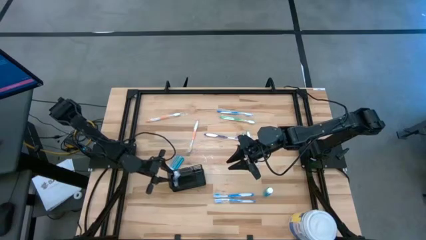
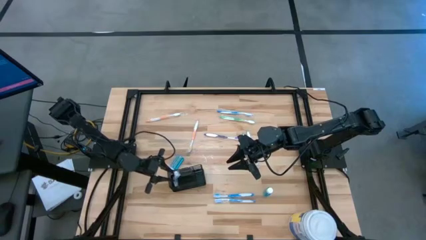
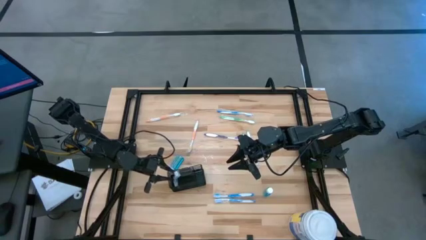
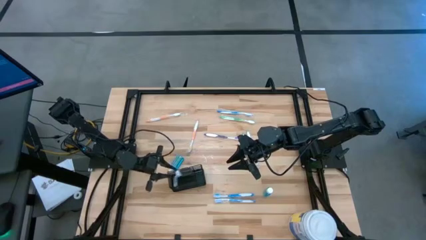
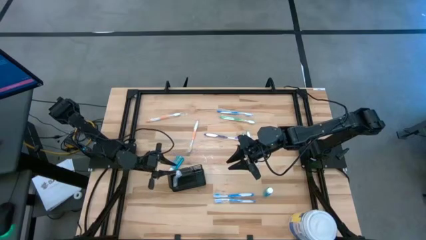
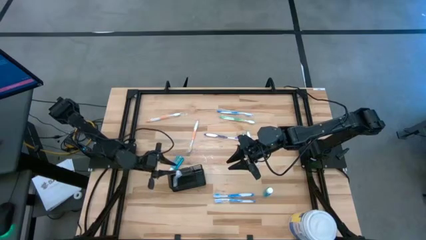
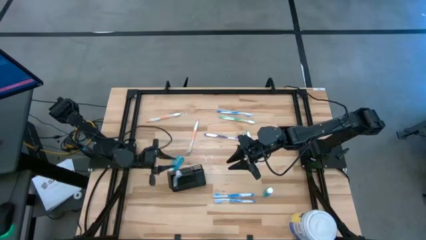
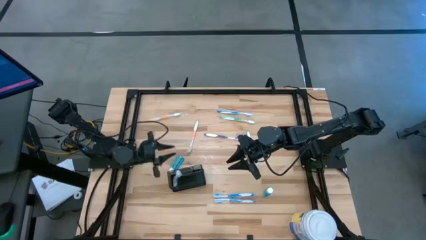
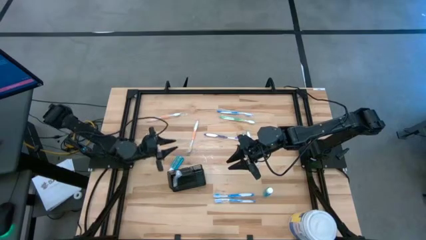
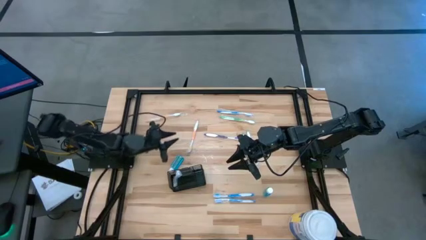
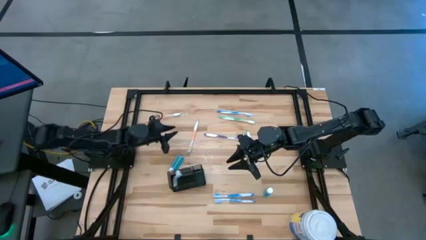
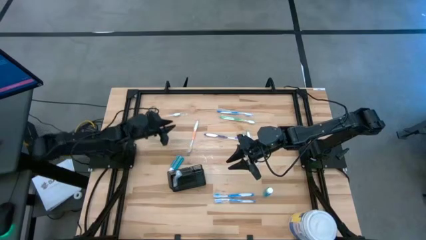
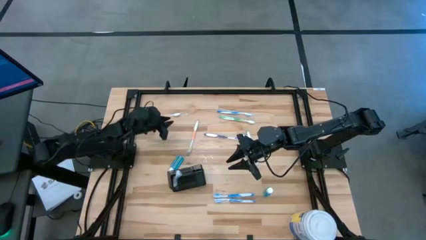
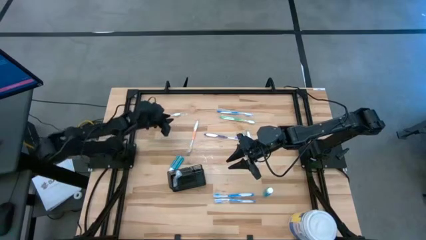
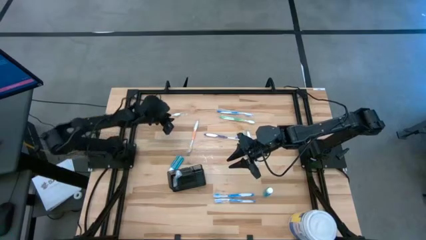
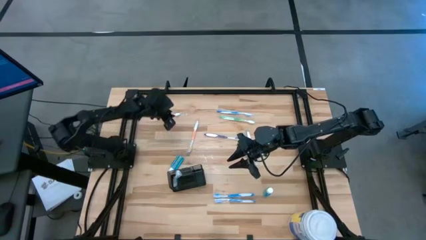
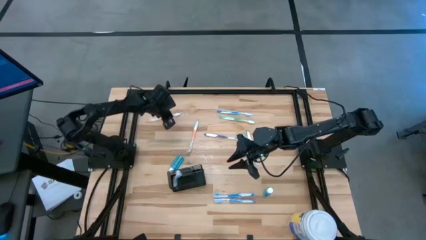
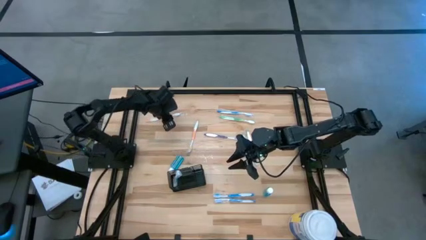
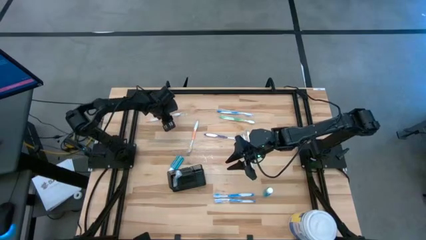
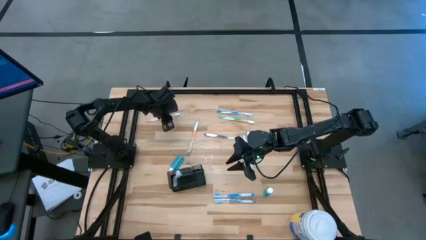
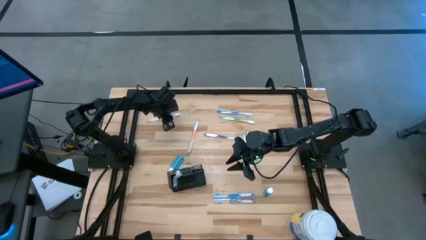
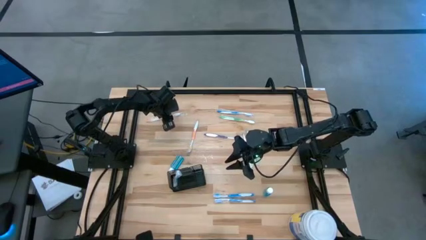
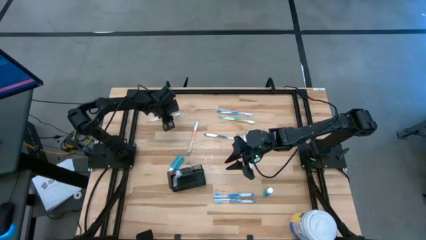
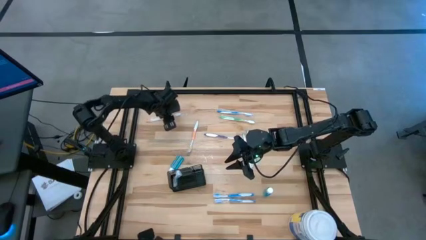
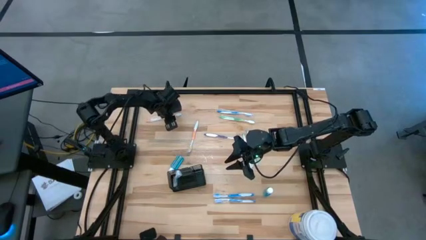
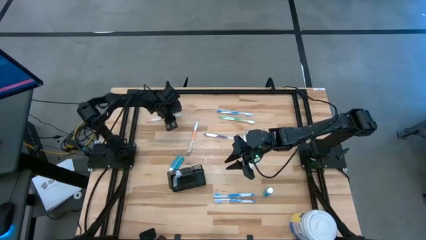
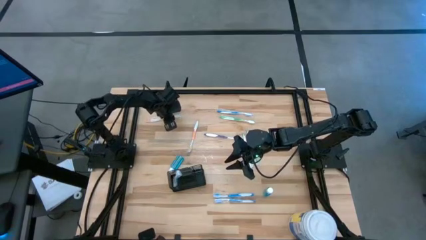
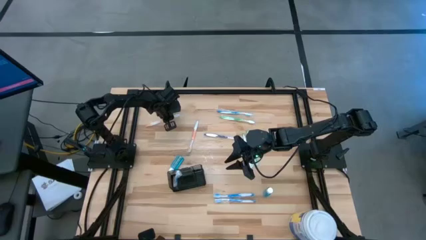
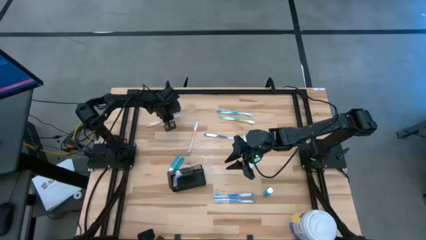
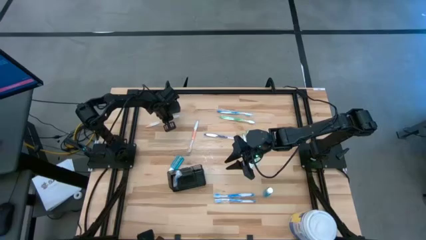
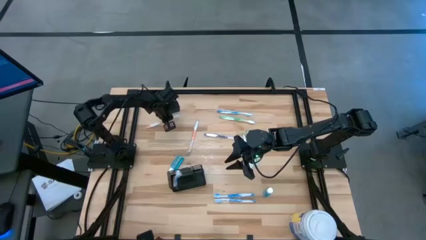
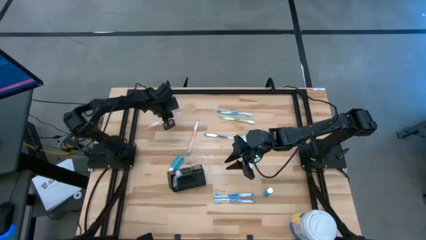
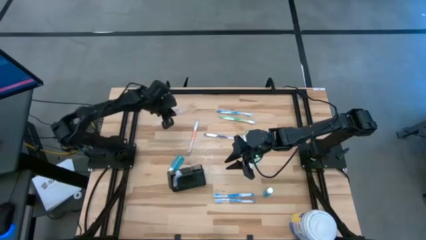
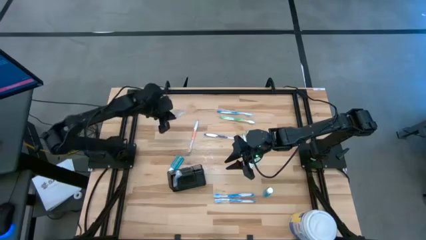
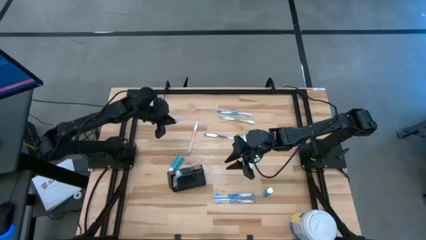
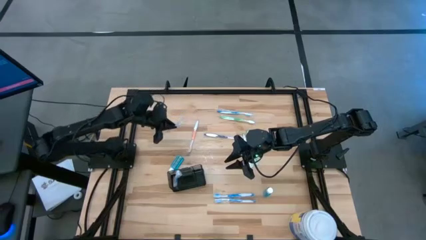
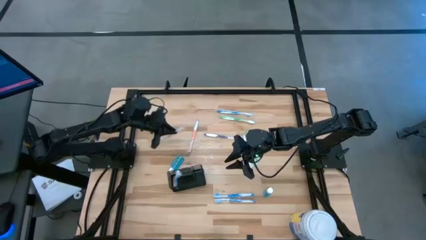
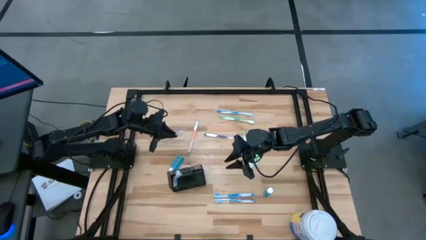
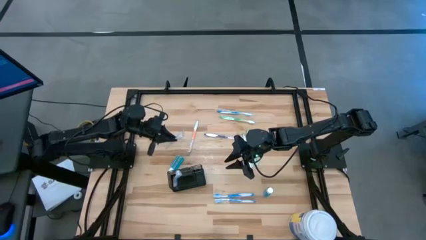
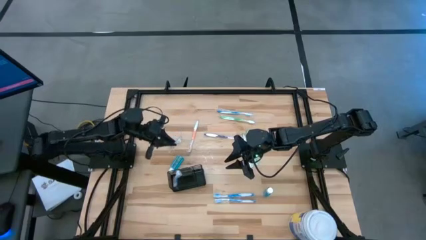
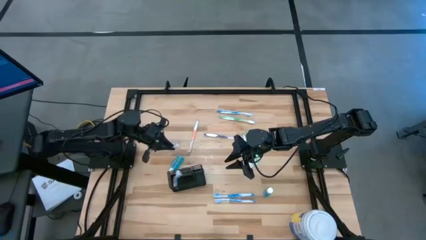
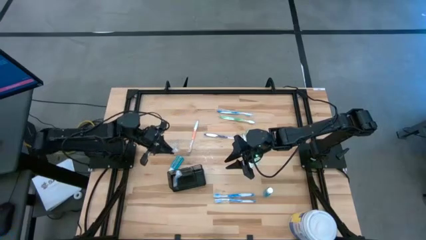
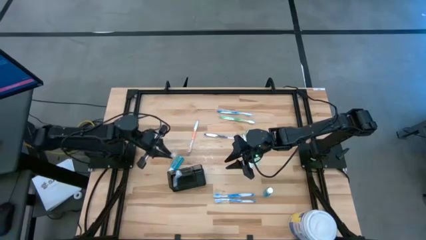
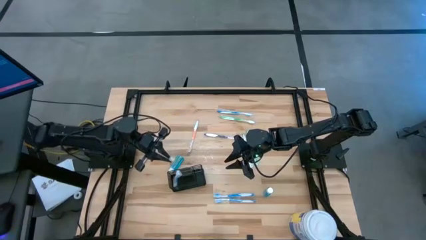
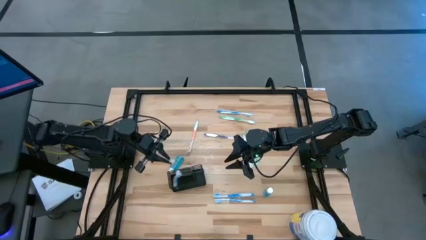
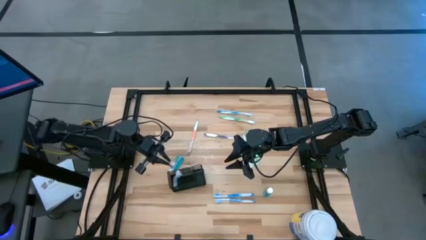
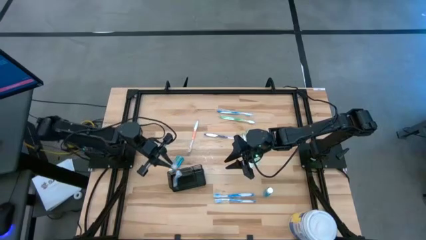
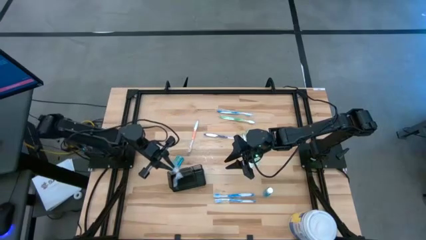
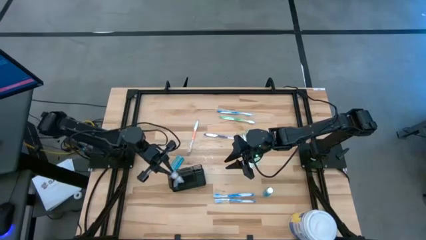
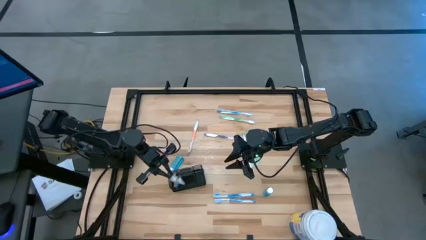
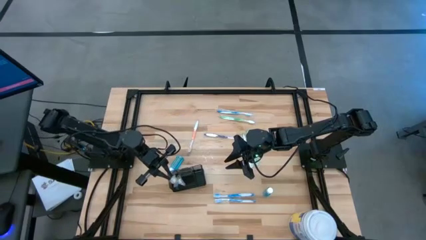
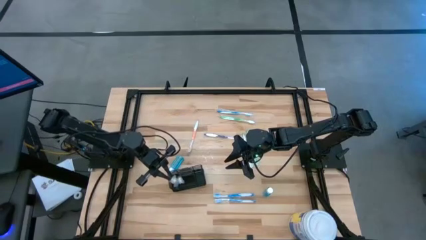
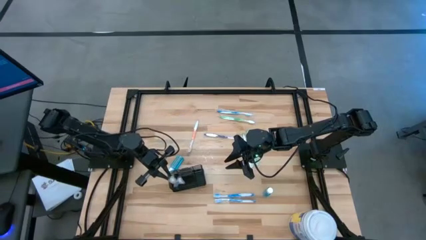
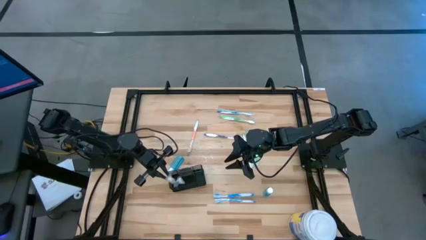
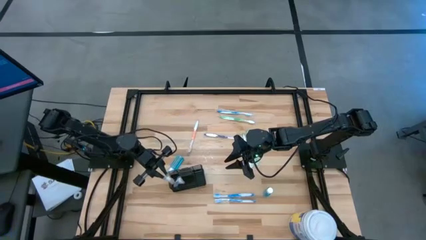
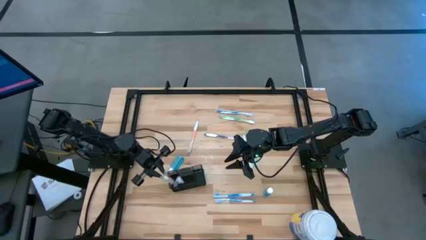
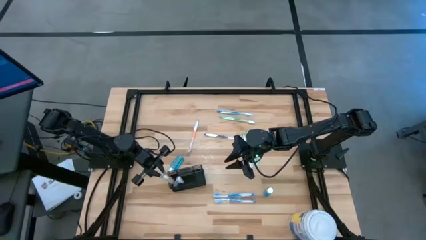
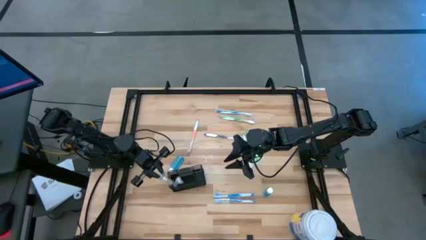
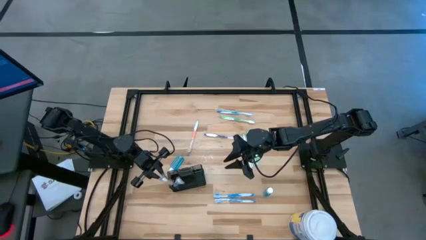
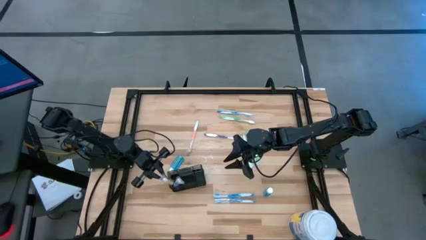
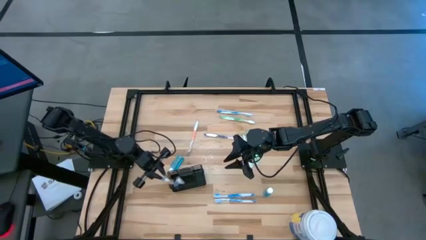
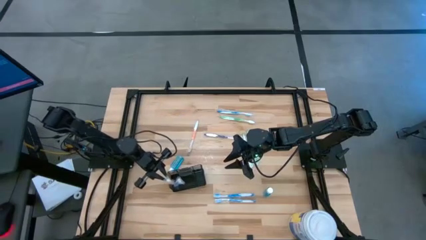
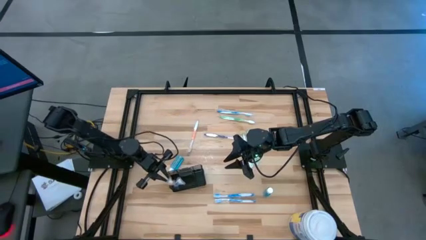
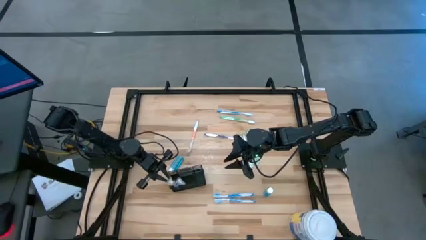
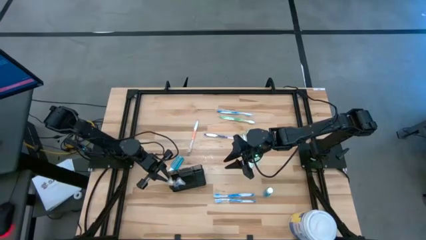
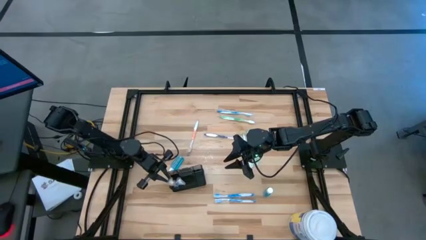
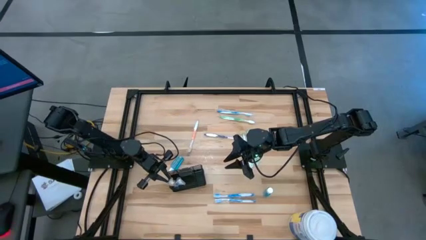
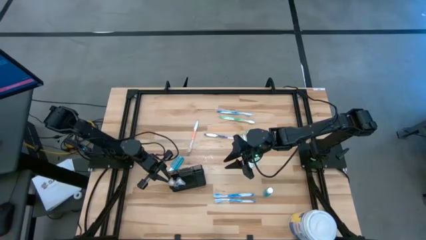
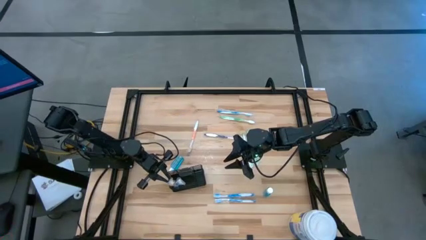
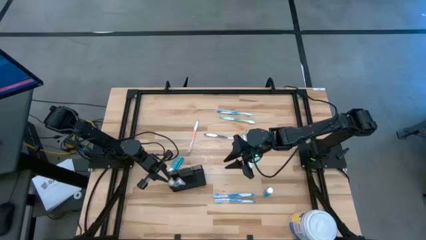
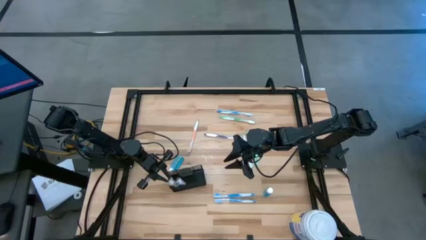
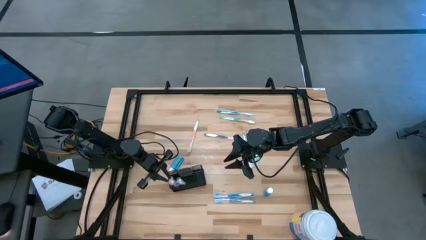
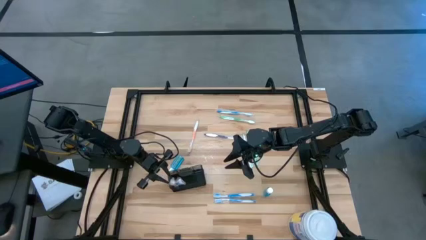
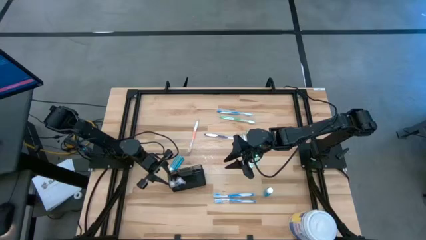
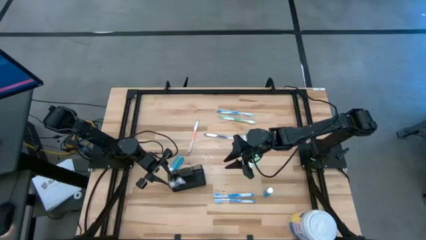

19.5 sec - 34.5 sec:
Task: Pick & Place toothbrushing station
Put the white orange toothbrush into the black toothbrush rack

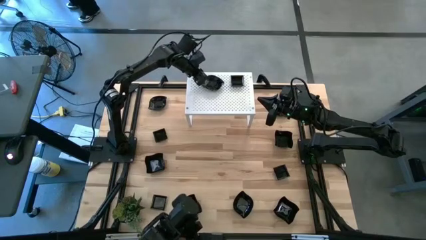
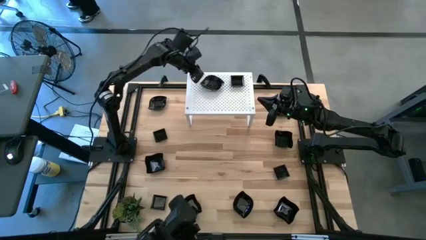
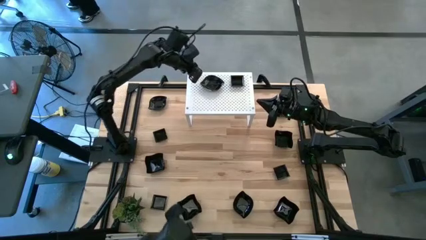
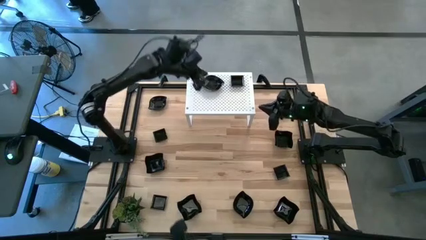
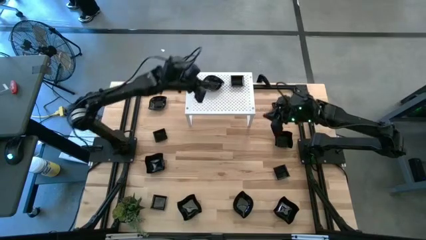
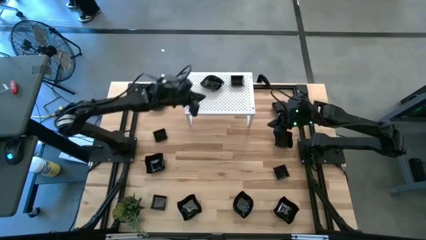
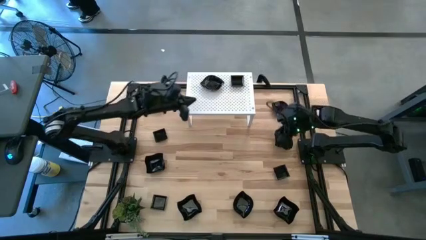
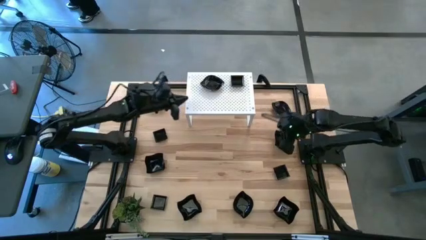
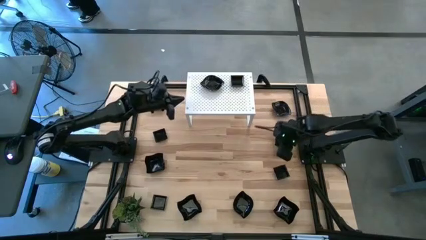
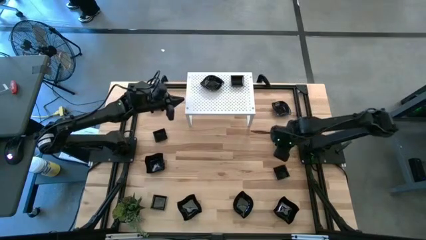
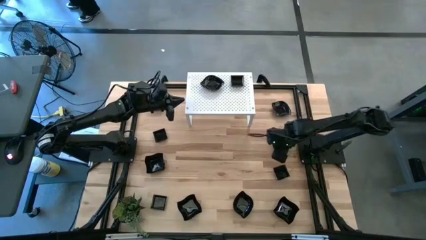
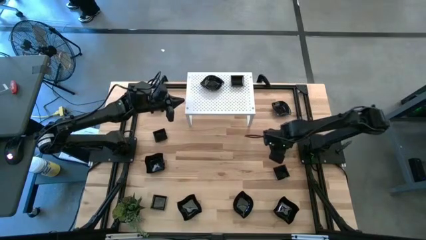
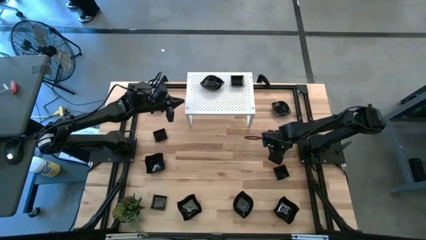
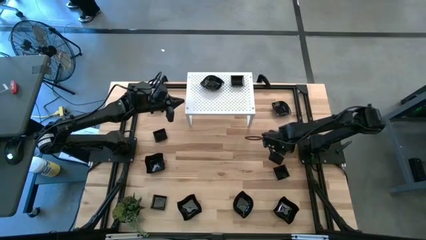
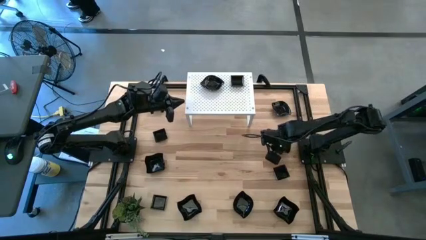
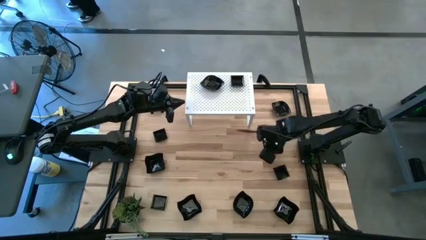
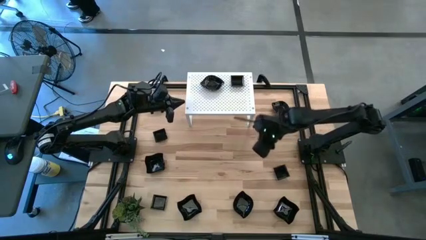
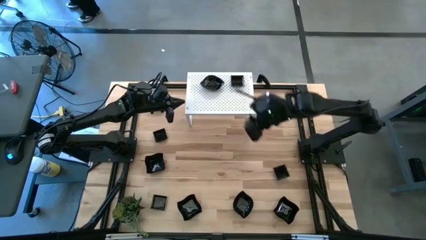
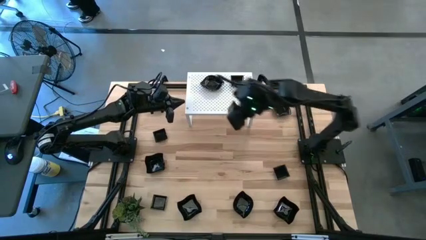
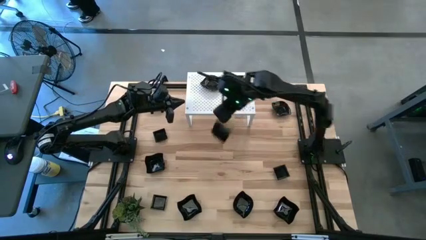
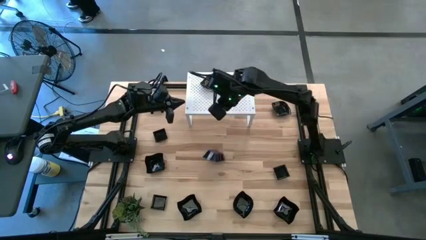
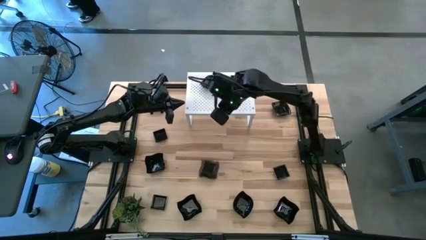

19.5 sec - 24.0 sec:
Task: Pick & Place Mini shaped plates
Put the distorted square plate on the shelf
